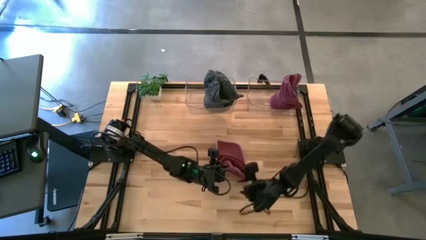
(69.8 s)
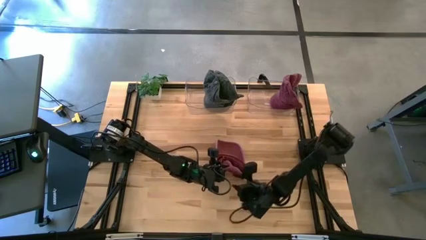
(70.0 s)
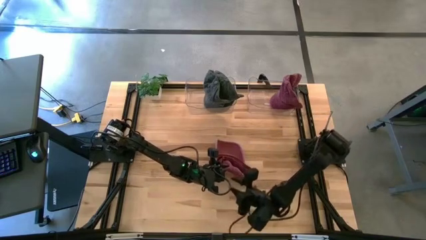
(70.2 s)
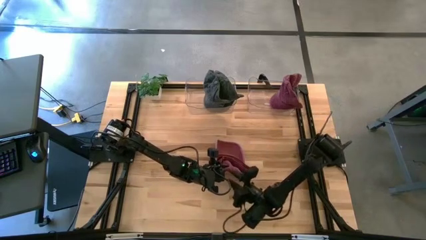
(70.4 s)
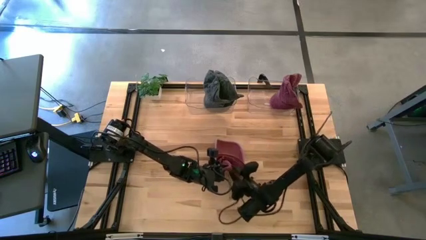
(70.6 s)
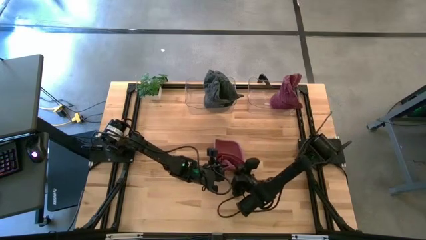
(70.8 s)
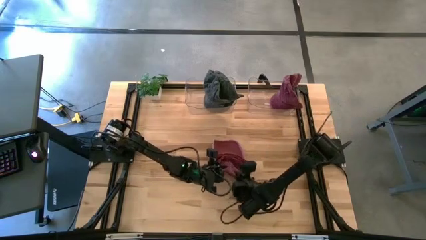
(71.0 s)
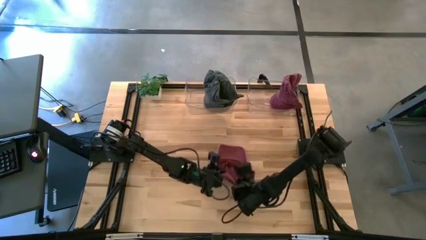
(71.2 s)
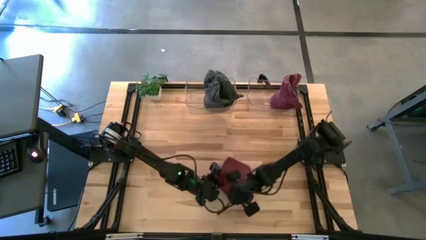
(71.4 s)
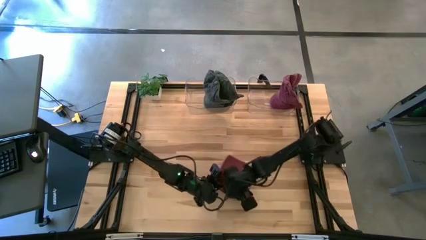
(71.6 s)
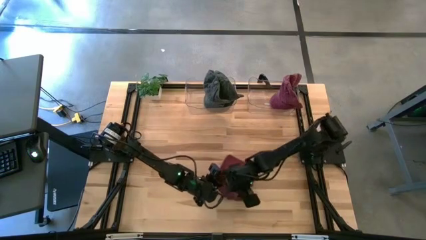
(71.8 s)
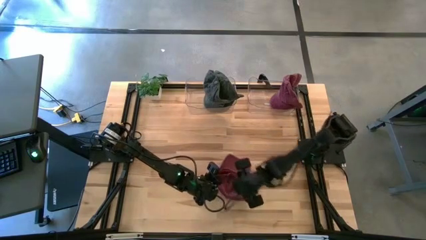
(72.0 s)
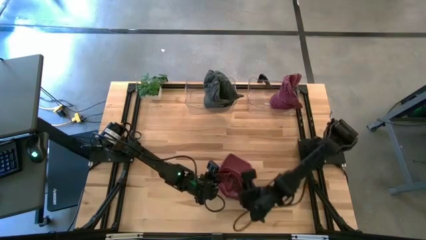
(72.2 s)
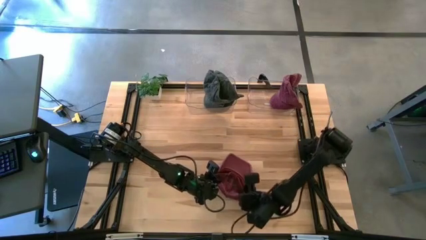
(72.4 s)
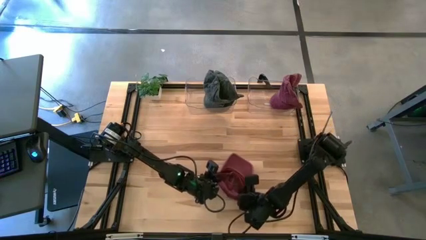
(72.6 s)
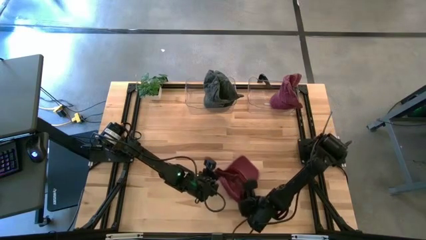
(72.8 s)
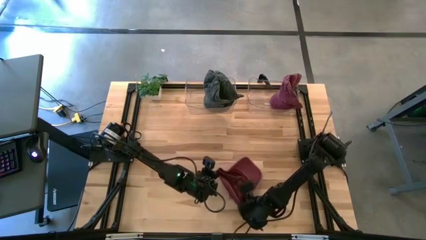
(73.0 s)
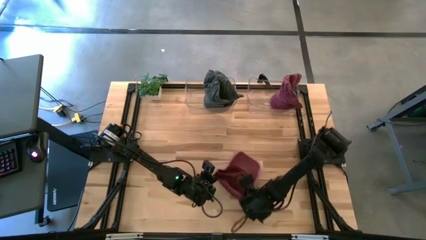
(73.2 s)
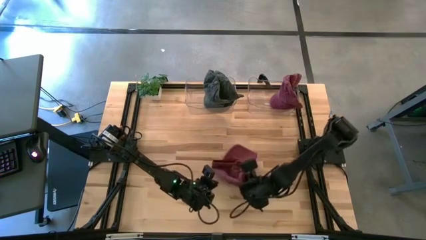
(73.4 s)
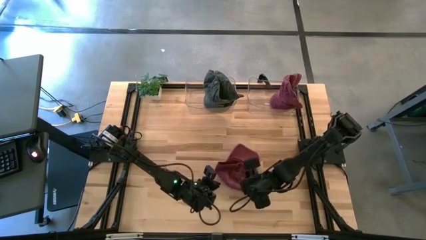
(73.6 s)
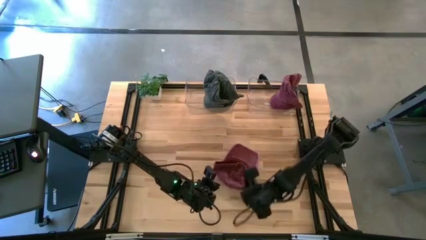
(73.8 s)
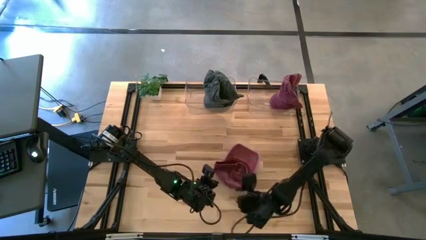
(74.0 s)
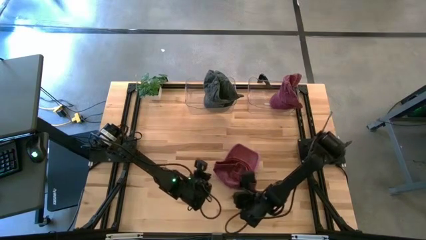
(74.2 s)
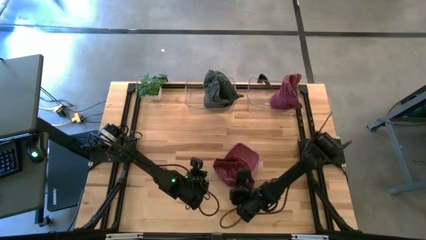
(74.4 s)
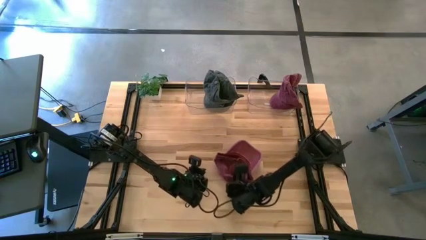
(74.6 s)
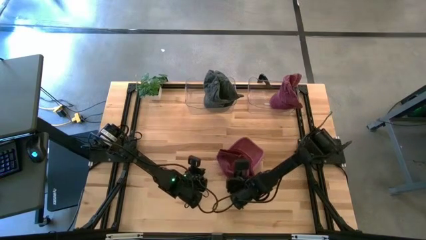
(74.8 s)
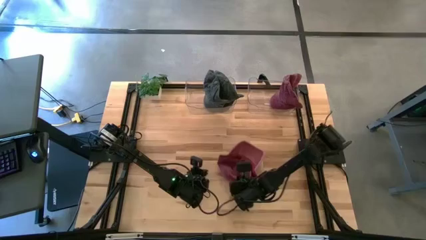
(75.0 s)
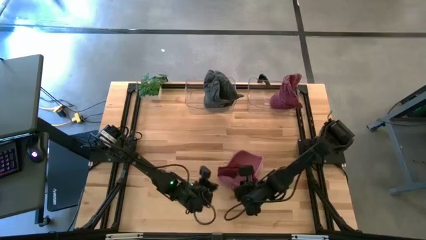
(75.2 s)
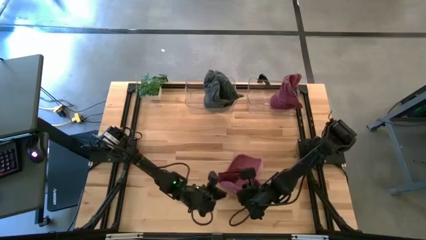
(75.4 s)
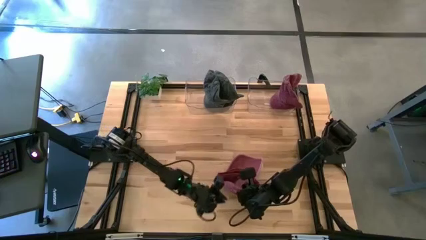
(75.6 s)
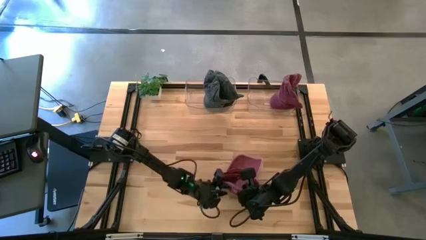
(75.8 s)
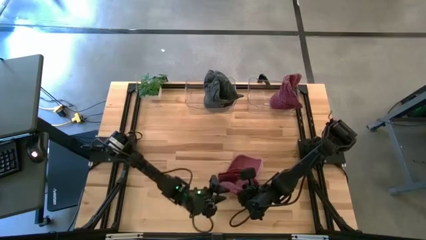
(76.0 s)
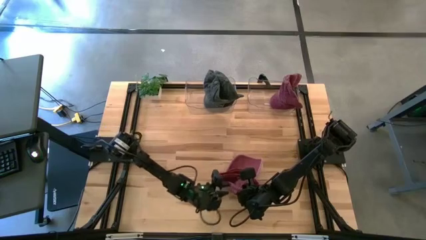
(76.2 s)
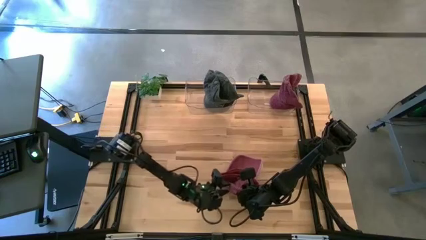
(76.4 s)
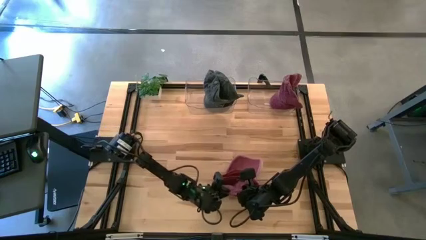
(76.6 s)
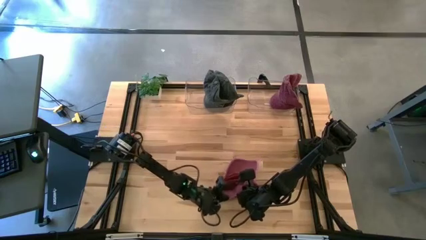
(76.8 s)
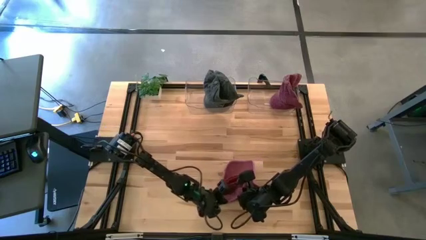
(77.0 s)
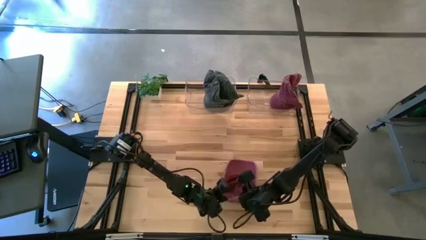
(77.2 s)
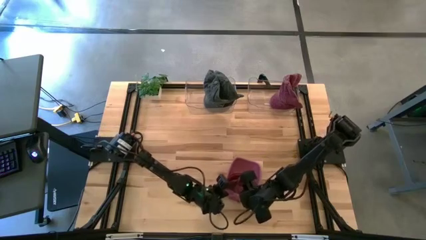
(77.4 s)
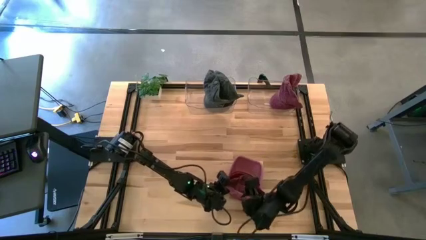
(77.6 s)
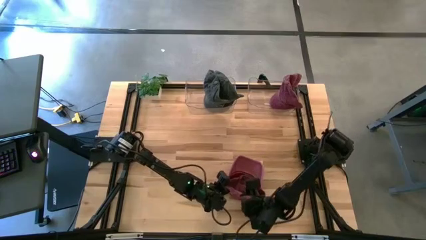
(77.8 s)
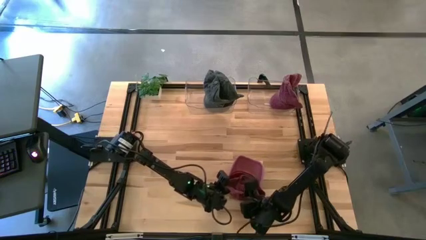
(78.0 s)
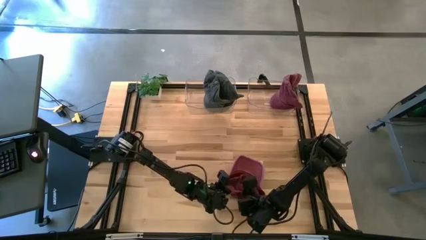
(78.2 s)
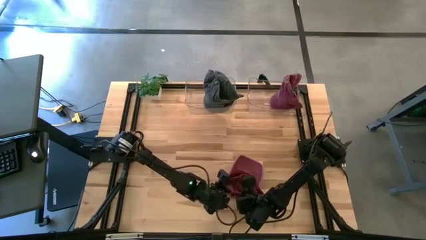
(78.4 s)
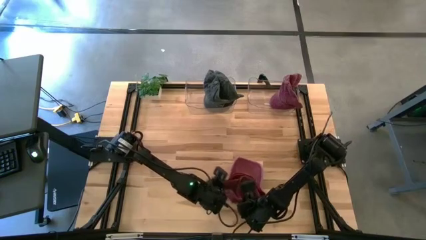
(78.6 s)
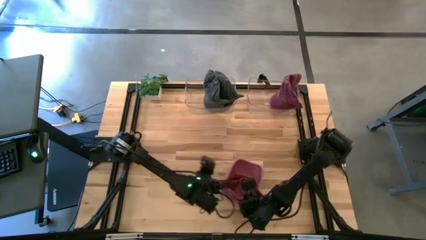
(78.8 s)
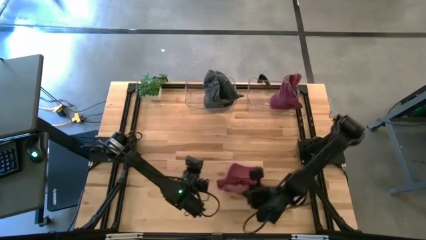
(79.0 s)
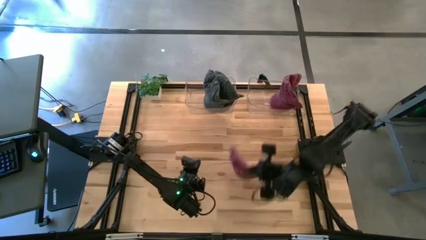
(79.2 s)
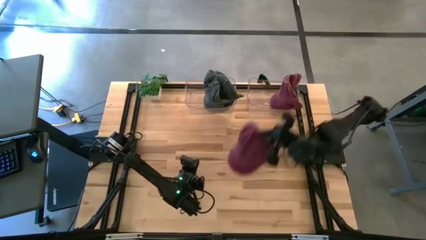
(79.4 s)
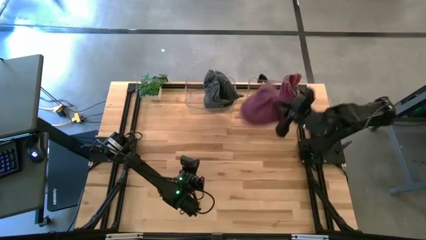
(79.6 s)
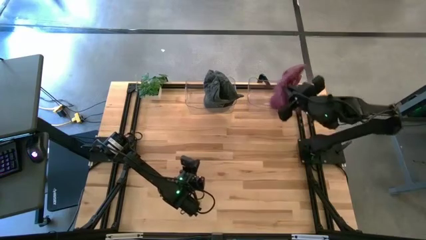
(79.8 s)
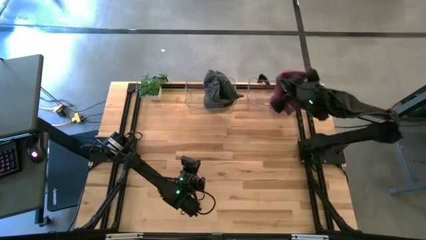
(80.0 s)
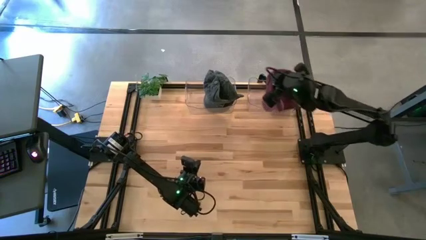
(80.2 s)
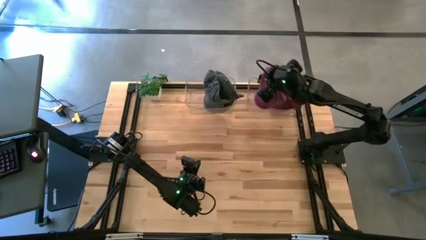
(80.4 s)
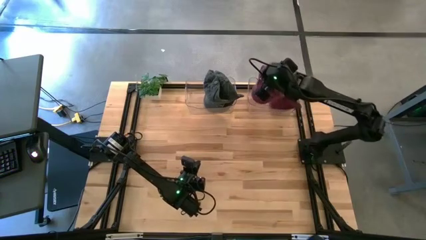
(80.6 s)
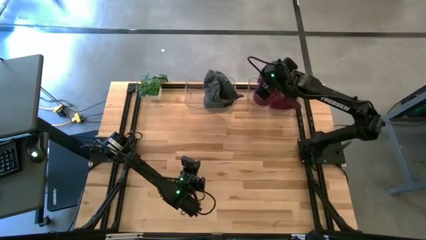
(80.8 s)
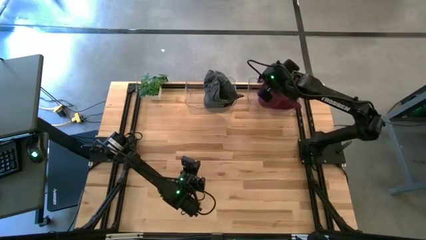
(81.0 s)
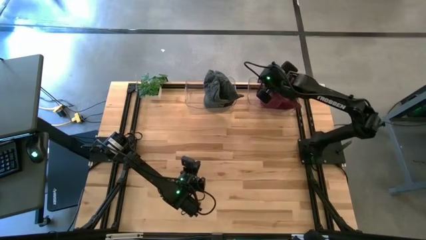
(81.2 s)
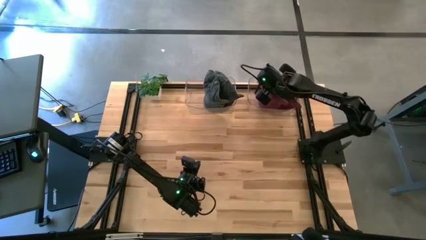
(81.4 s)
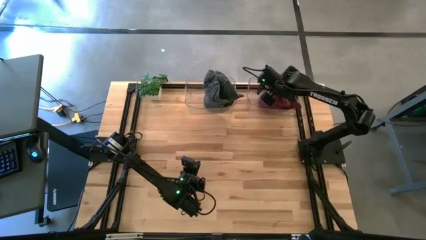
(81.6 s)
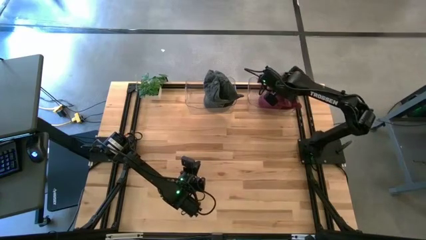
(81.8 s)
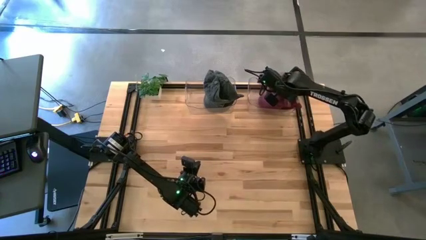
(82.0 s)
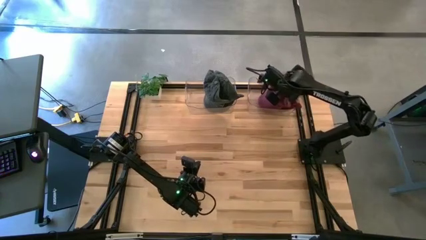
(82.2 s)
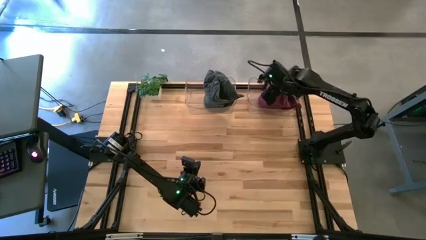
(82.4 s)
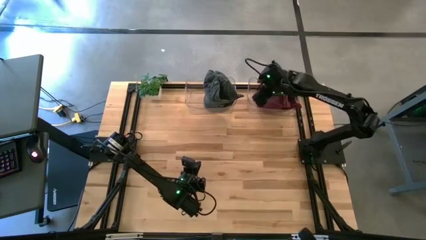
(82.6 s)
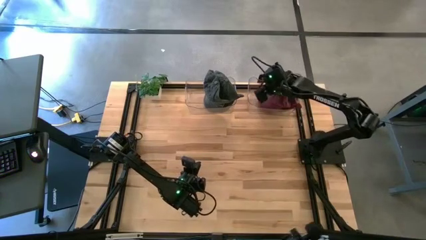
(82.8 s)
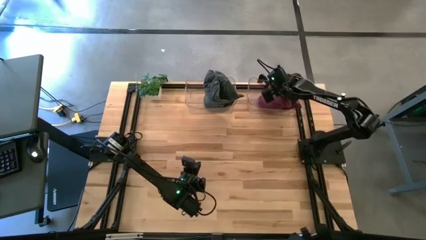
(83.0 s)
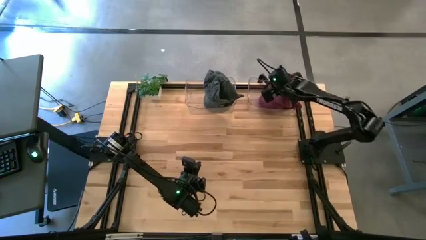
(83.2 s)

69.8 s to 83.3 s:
Task: Pick & Place hat
Put the red cap into the right transparent bin
